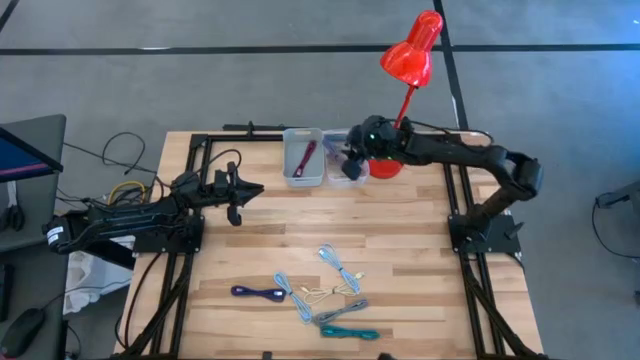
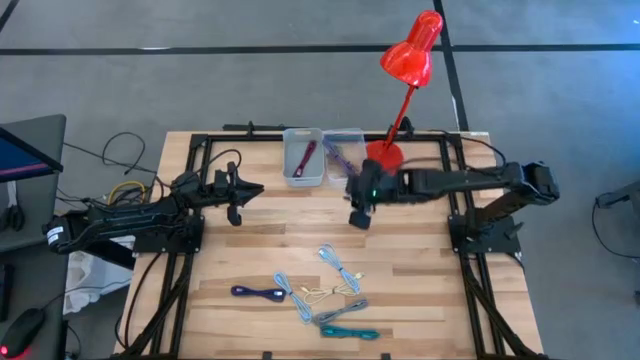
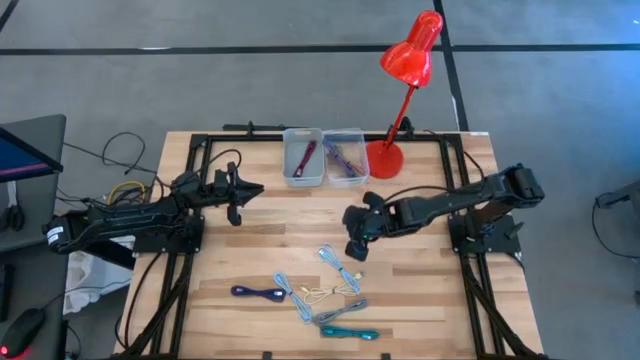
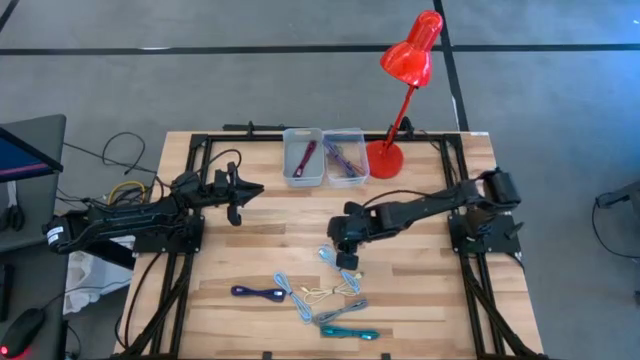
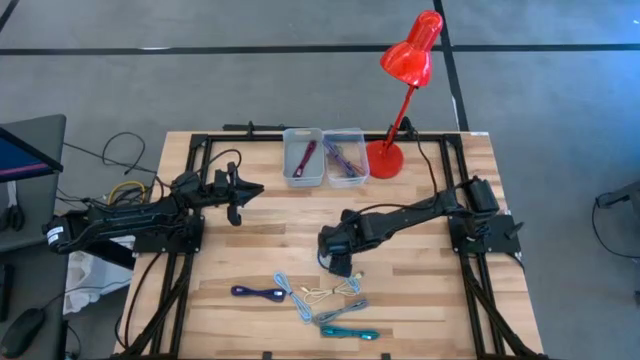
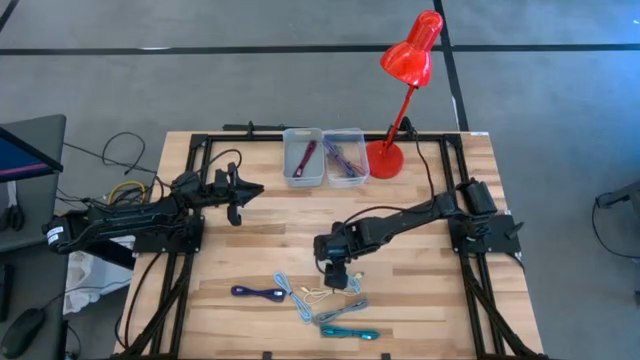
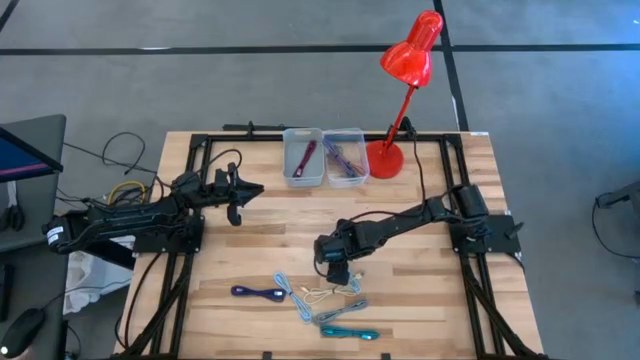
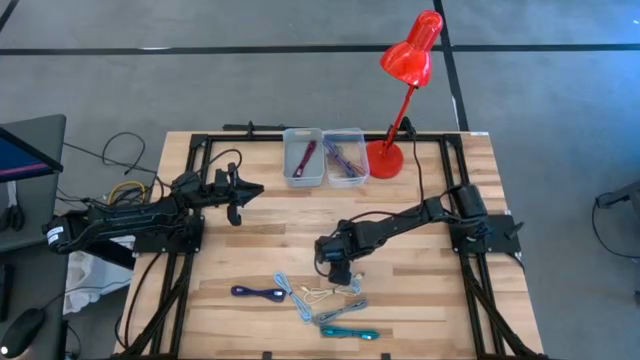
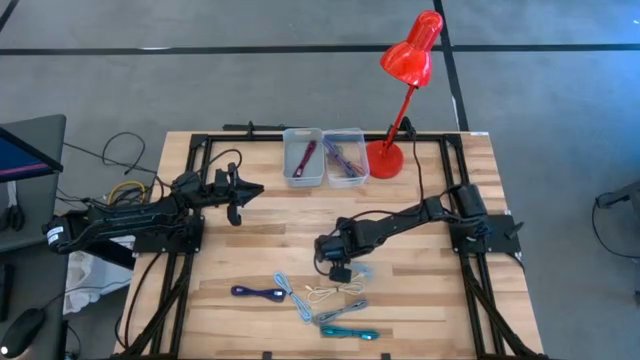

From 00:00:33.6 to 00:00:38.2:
Task: Pick & Place USB Port
Put the top light blue charger cable into the transparent bin

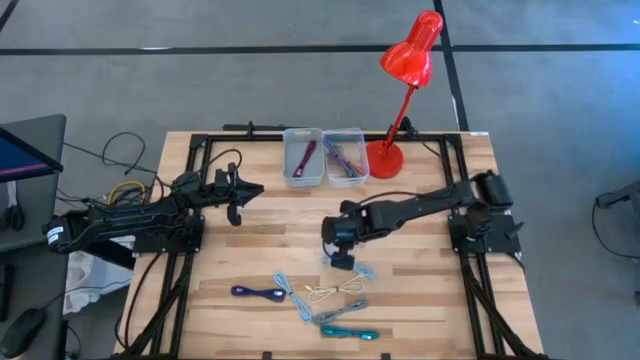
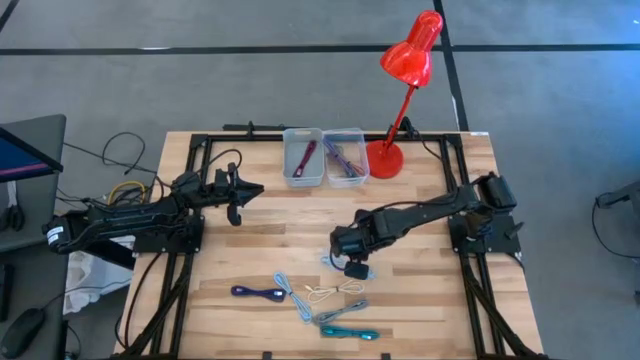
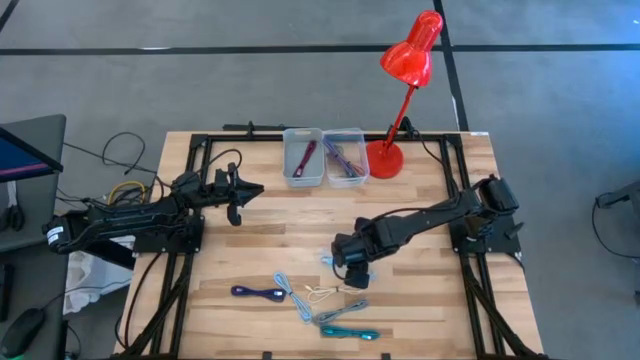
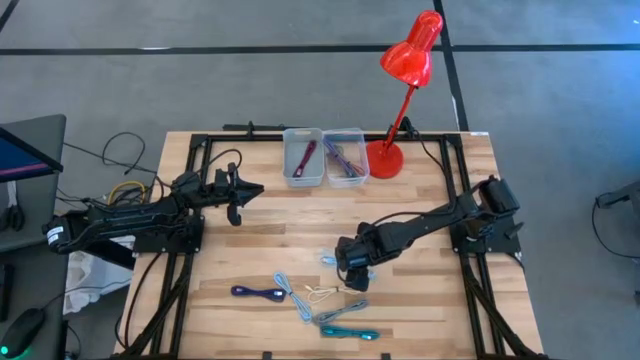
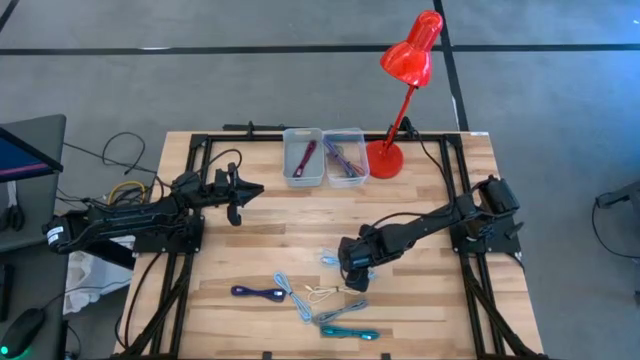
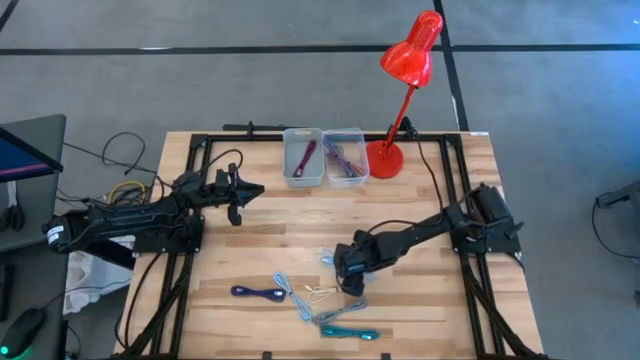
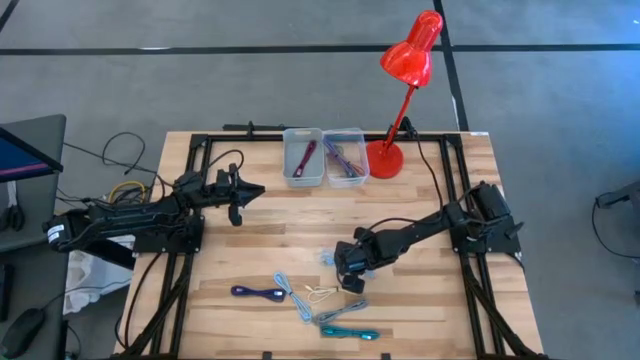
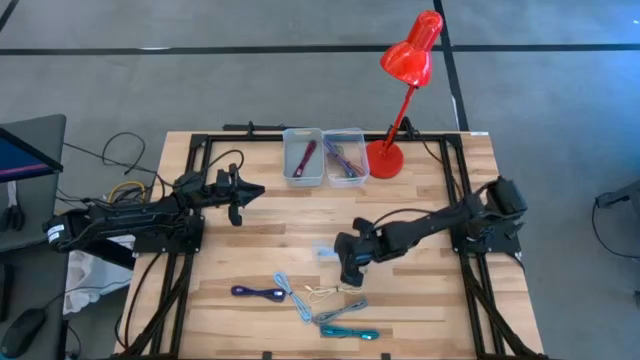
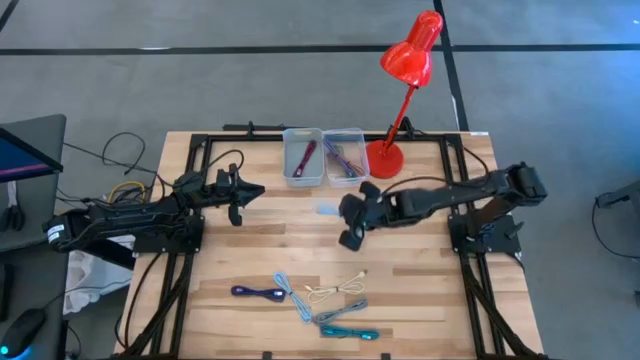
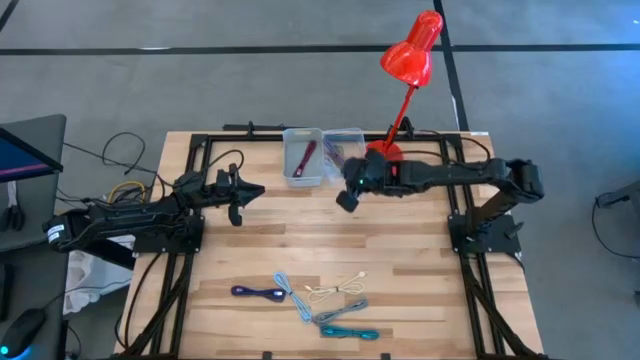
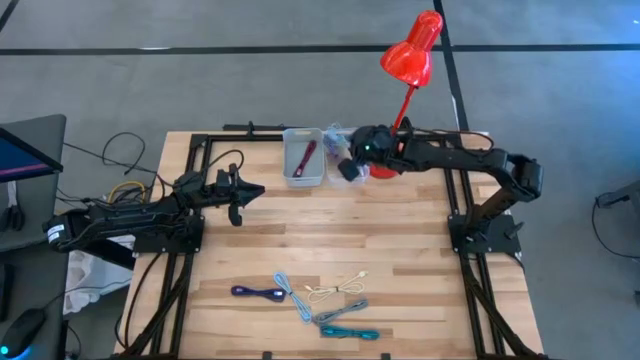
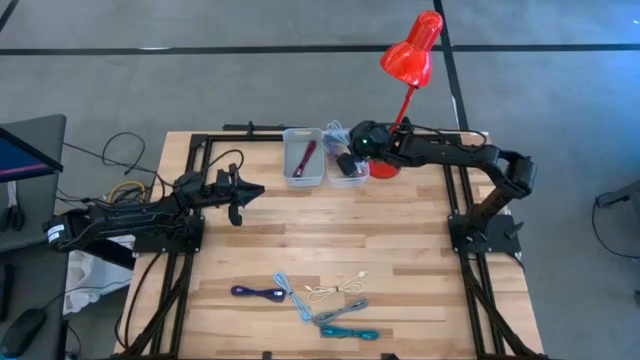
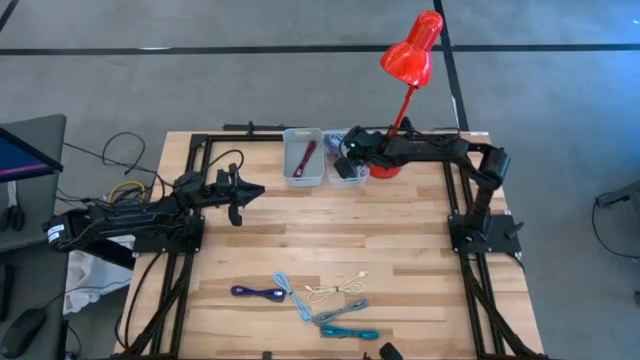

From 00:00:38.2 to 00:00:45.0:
Put the top light blue charger cable into the transparent bin

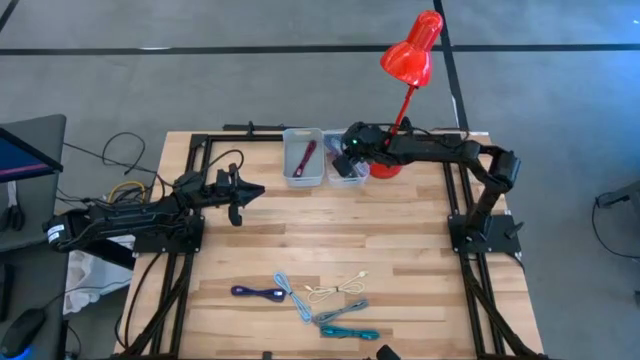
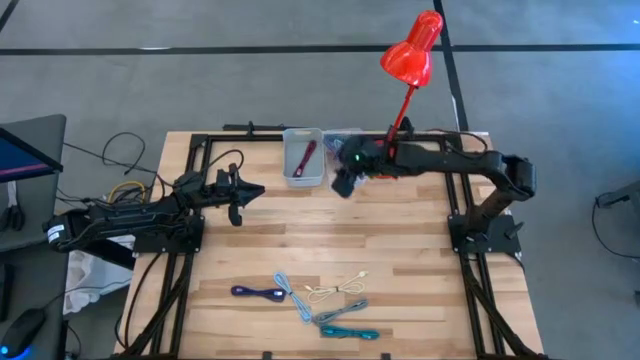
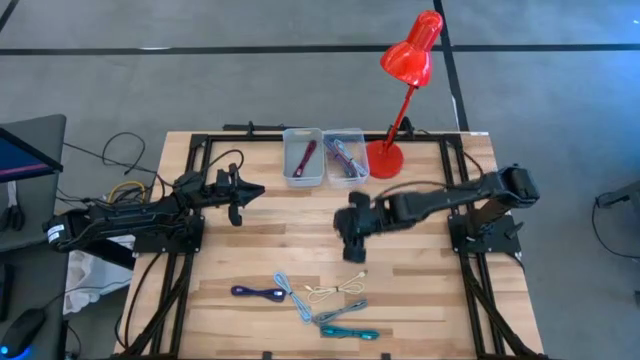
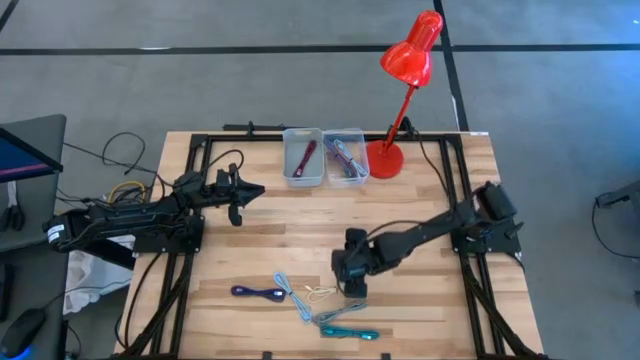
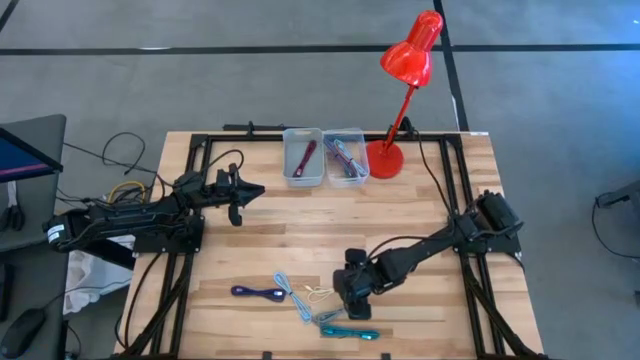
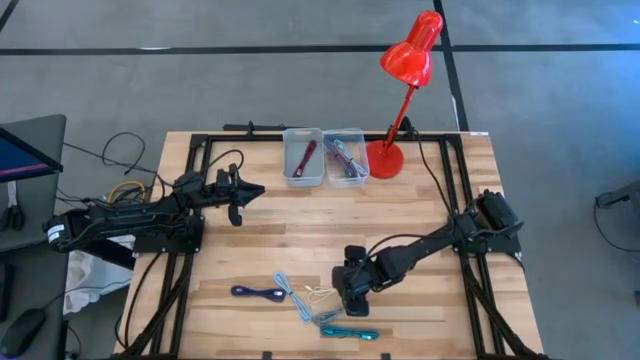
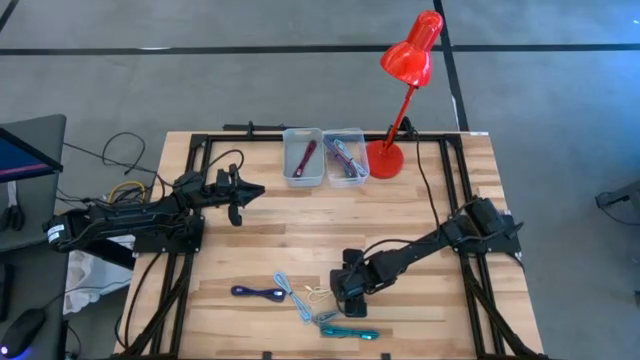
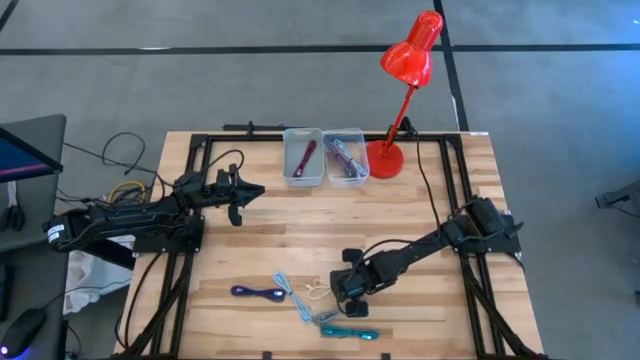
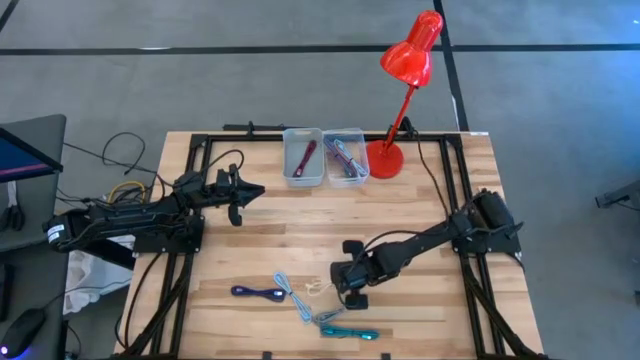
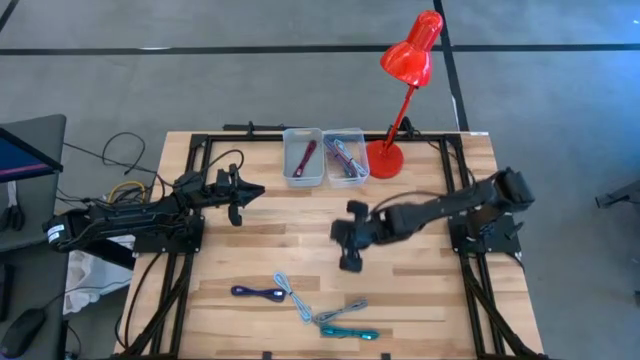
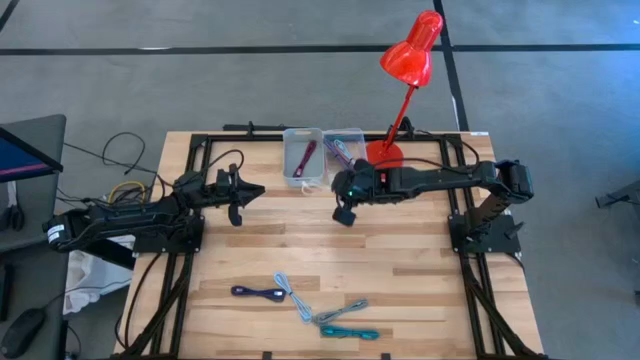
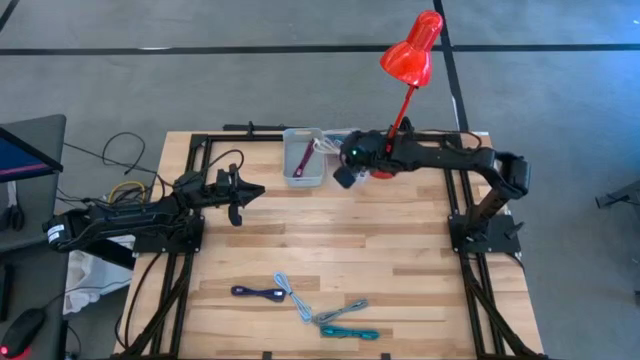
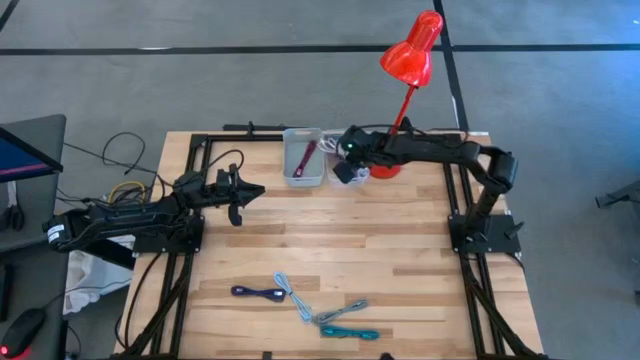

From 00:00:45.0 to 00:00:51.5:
Put the white charger cable into the transparent bin

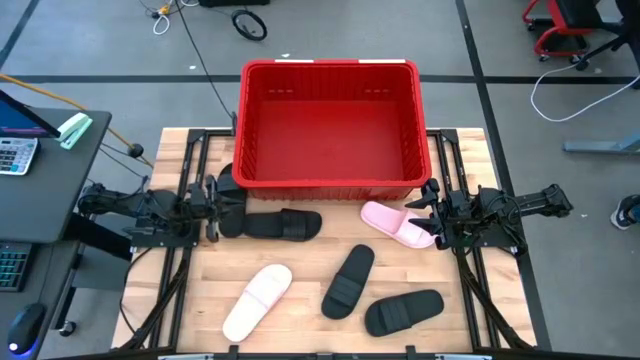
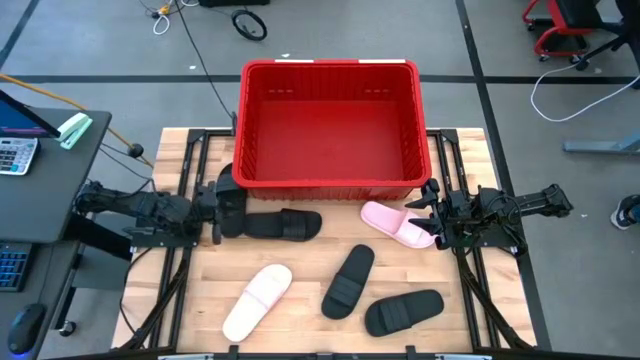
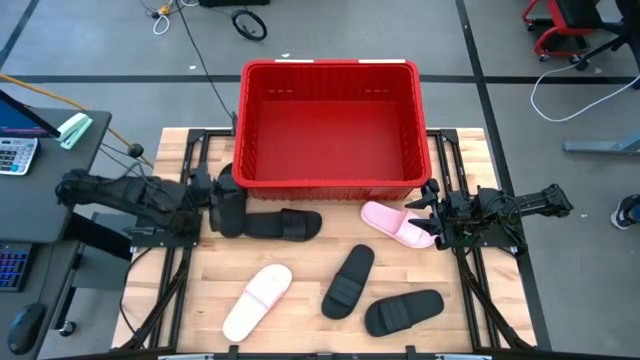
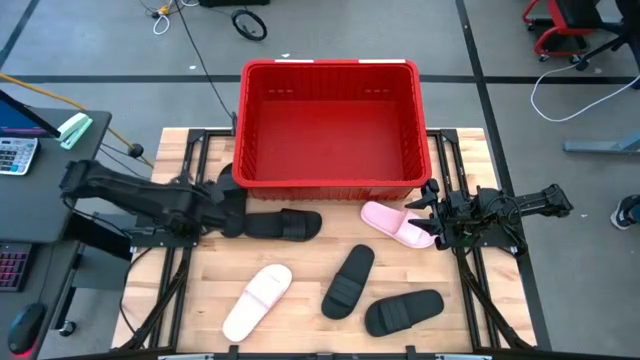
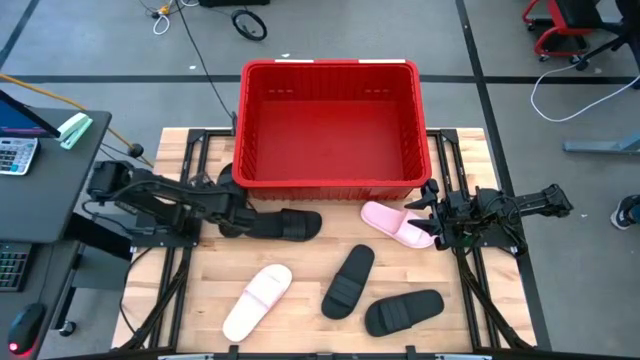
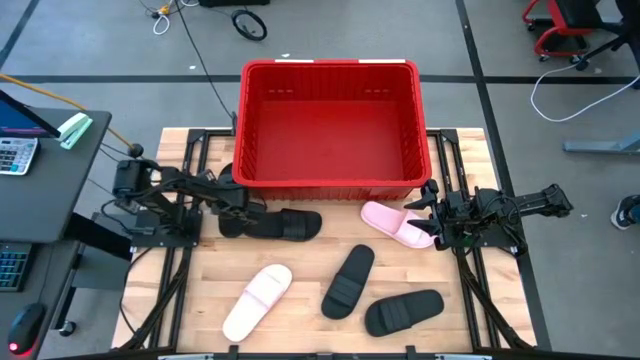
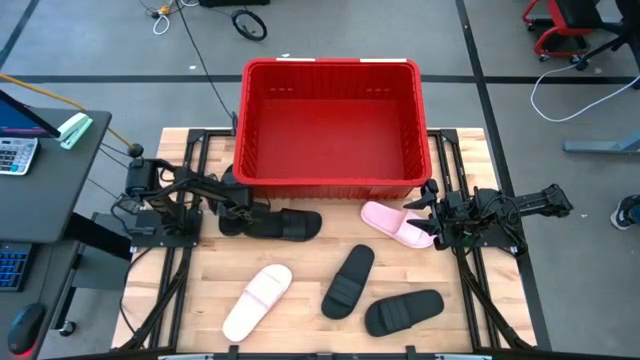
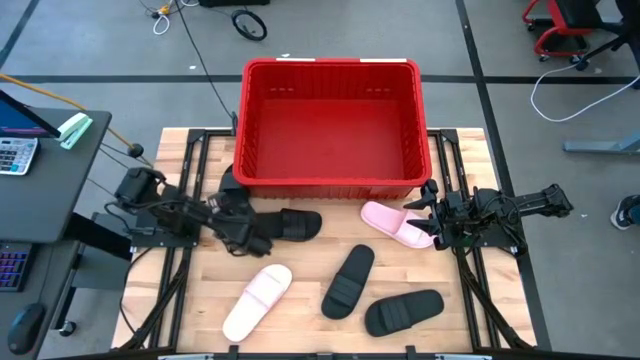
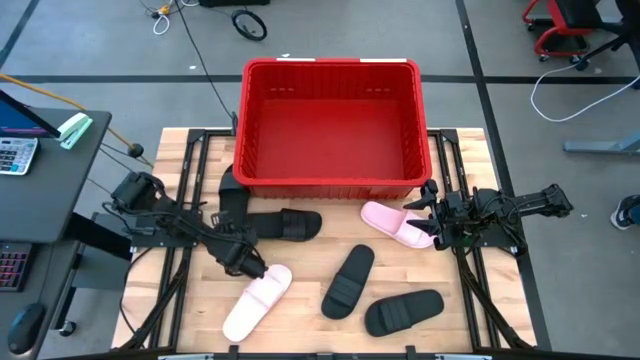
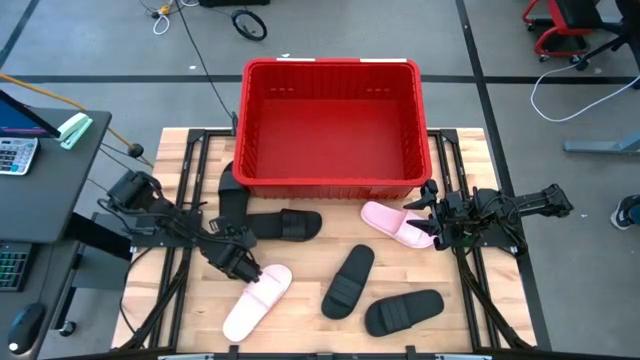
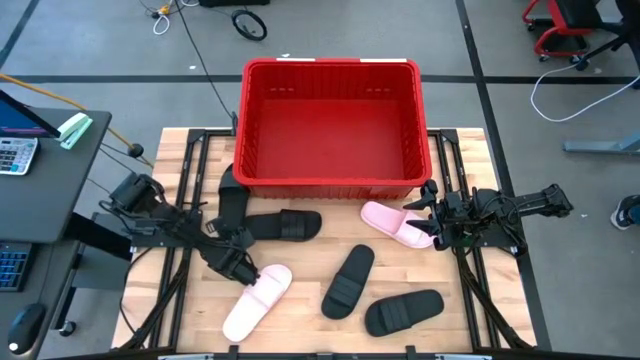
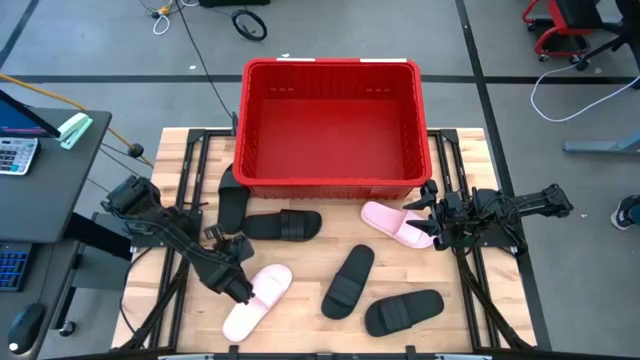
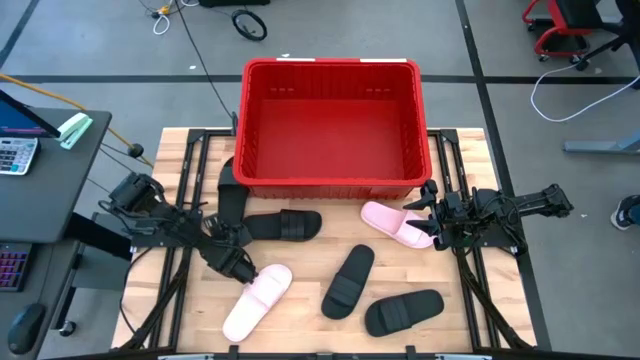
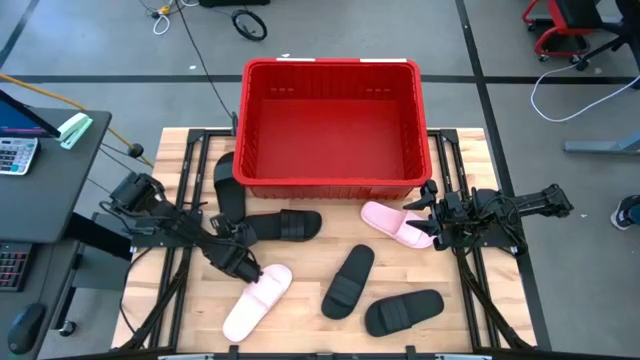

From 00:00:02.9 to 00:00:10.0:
Task: Pick and place slides into bin
Put the black slipper into the red bin
